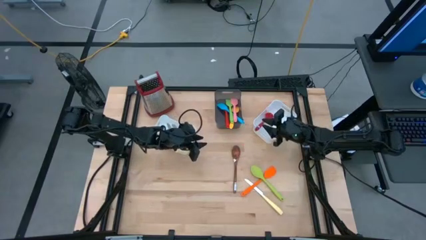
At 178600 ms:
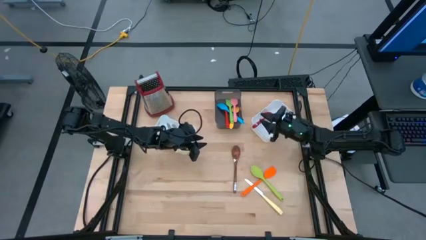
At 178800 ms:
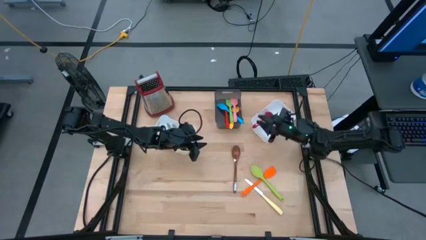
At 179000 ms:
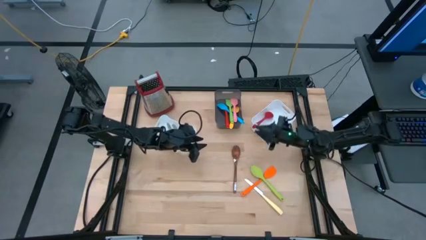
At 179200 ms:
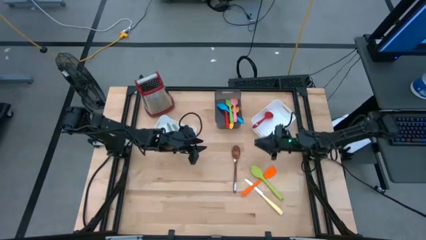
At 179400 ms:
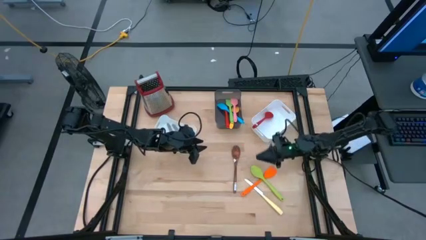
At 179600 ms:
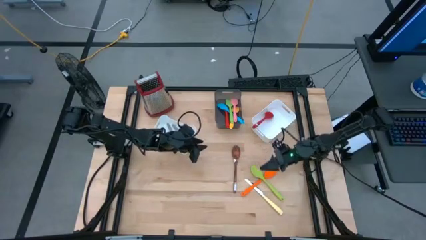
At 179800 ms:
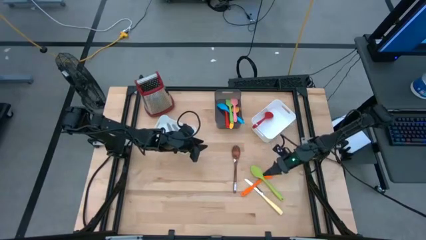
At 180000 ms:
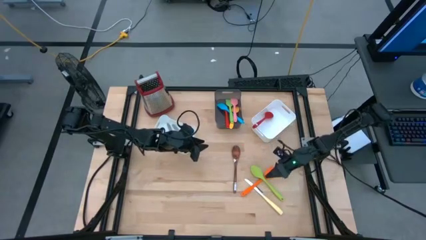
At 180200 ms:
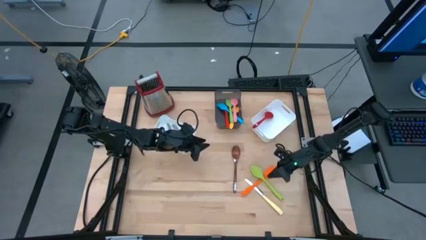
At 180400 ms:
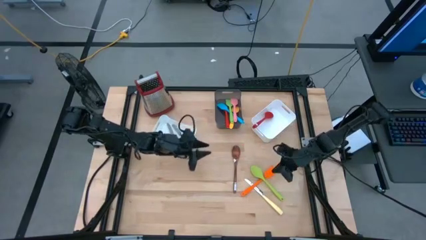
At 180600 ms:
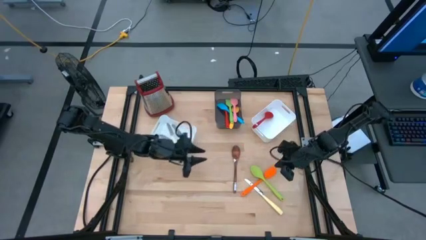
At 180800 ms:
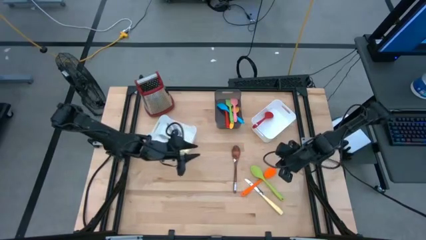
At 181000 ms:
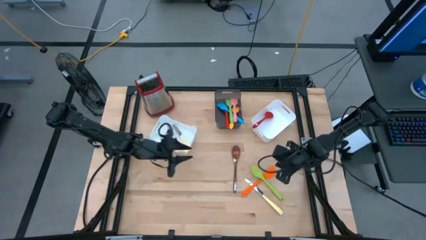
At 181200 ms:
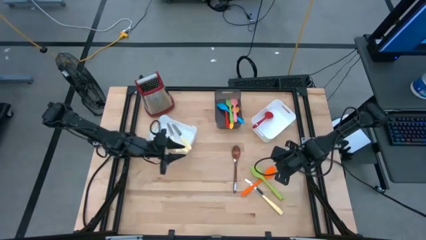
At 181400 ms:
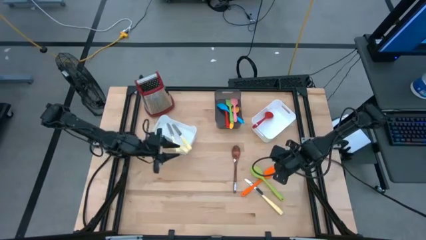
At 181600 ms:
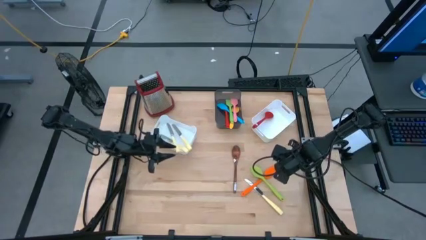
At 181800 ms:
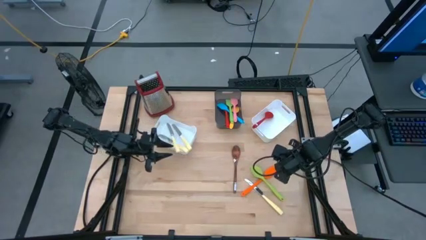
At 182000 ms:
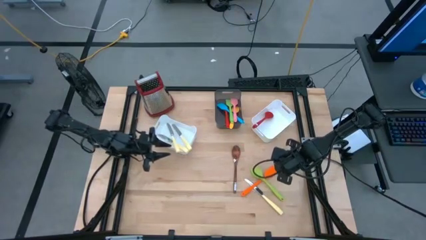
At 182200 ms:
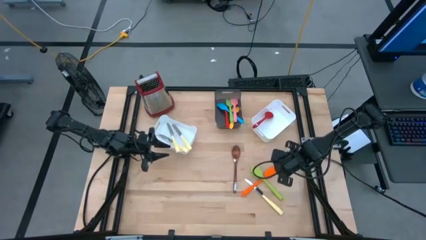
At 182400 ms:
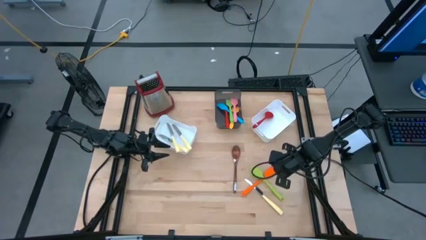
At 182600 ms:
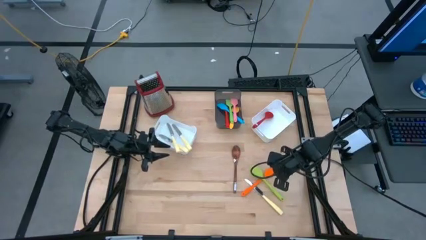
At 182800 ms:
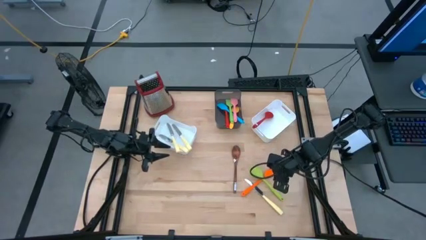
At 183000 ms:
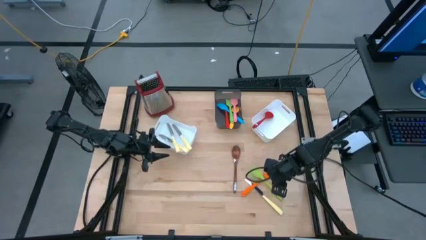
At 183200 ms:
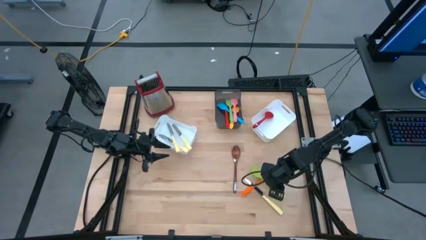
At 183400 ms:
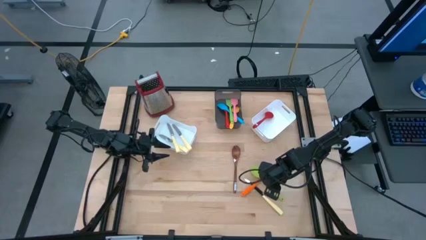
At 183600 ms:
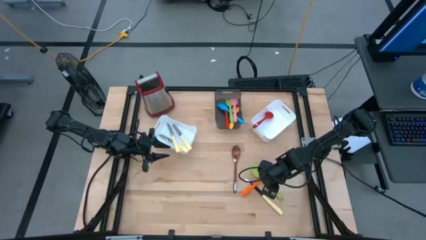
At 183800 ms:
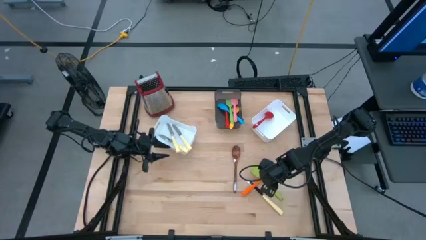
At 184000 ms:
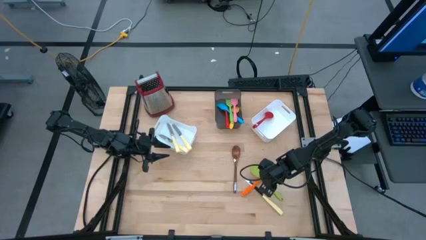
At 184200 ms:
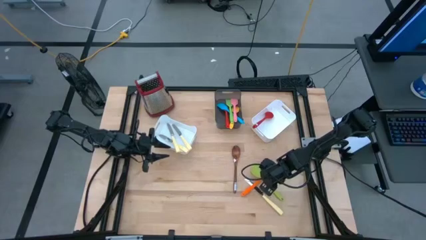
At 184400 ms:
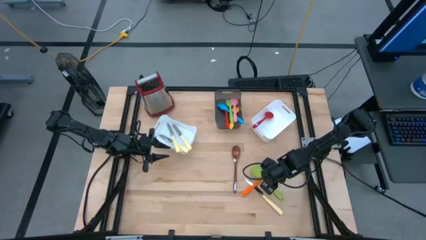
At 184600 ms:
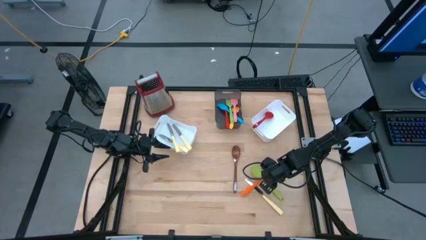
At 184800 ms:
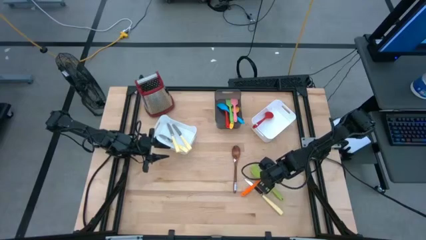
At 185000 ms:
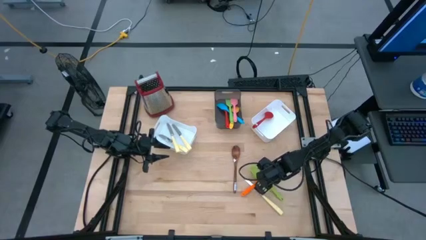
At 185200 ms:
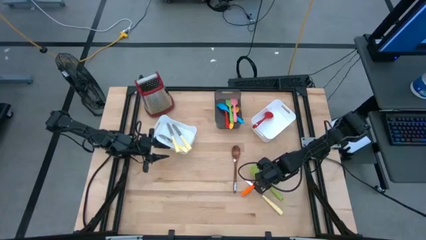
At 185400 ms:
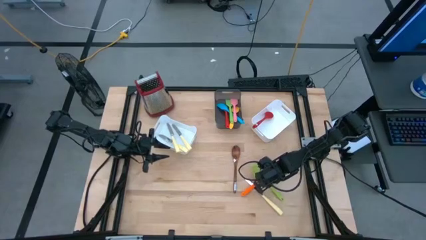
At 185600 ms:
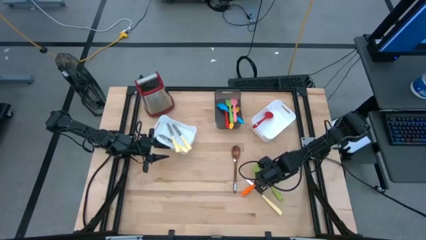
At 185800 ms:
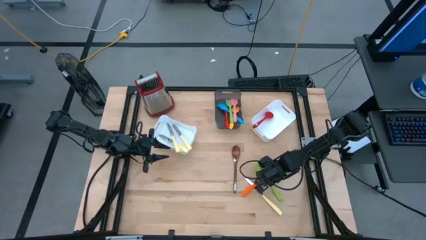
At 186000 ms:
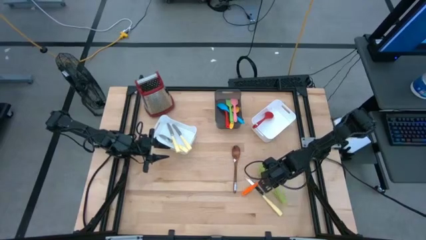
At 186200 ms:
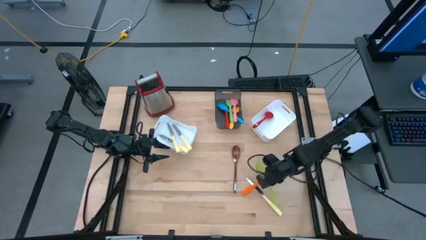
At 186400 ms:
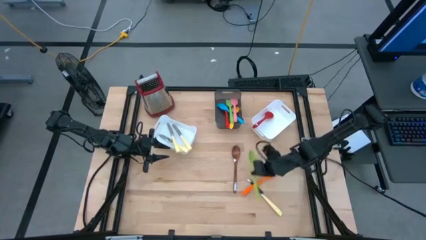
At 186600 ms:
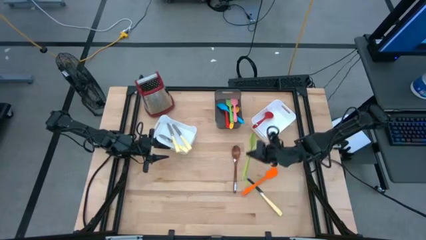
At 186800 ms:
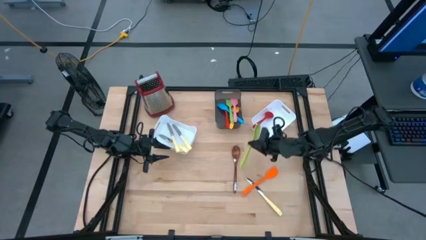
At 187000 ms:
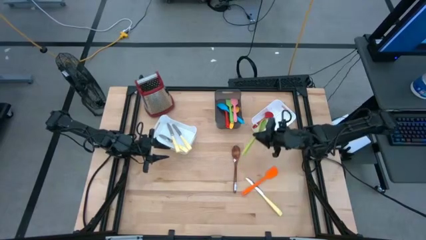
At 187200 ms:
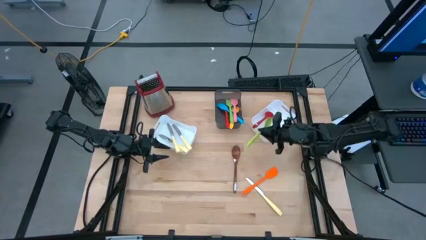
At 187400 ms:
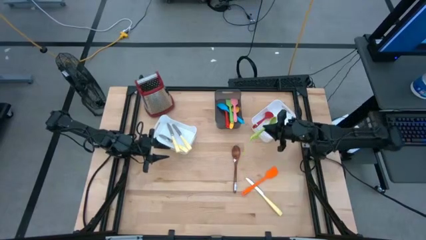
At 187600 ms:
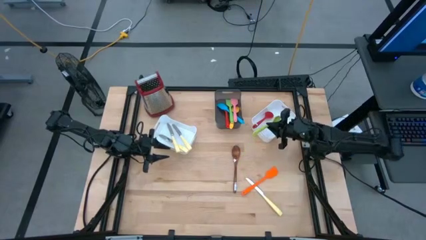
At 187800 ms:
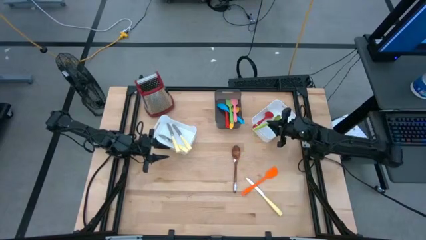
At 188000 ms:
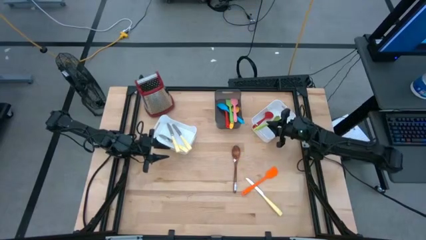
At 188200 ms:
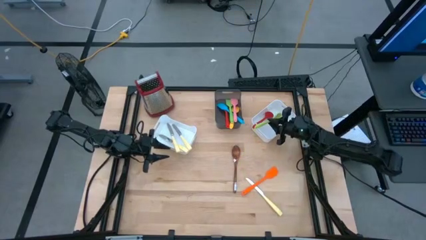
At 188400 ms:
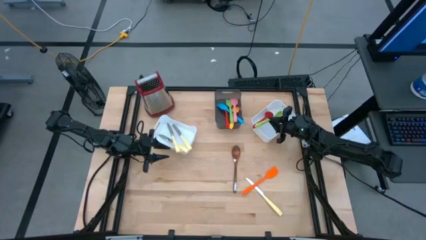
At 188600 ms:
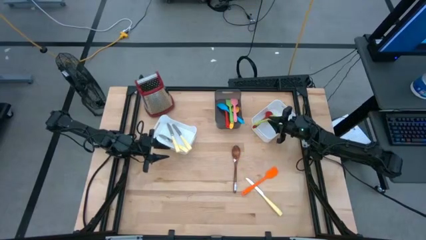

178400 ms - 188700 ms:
Task: Pick & Place Kitchen Items
Put the green slotted spoon into the right white bin
